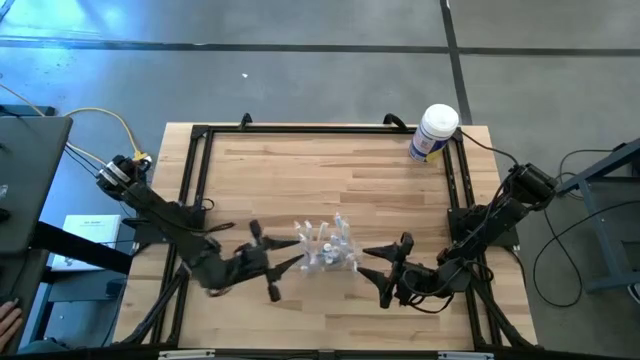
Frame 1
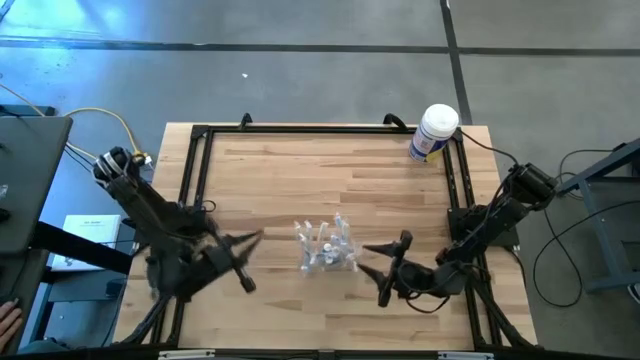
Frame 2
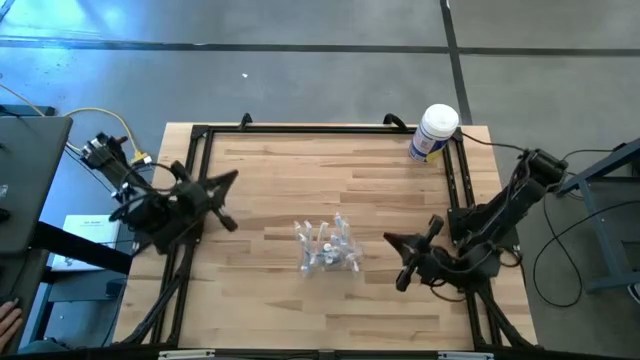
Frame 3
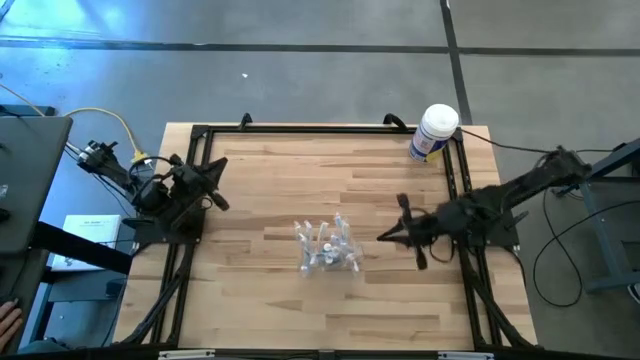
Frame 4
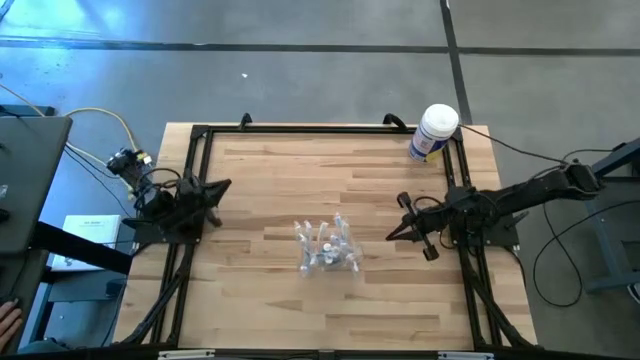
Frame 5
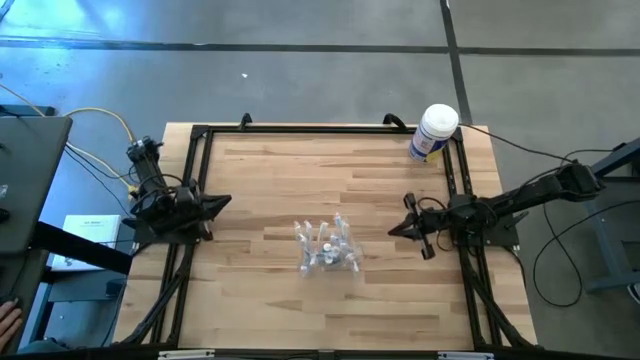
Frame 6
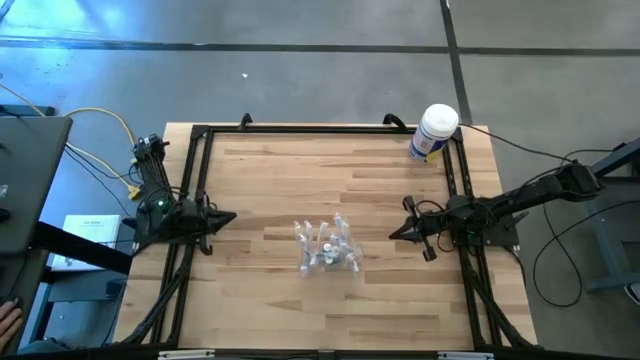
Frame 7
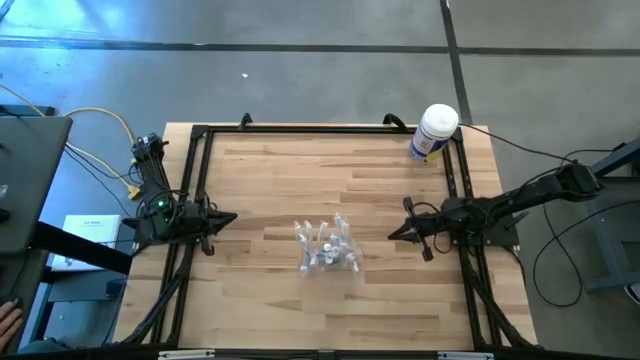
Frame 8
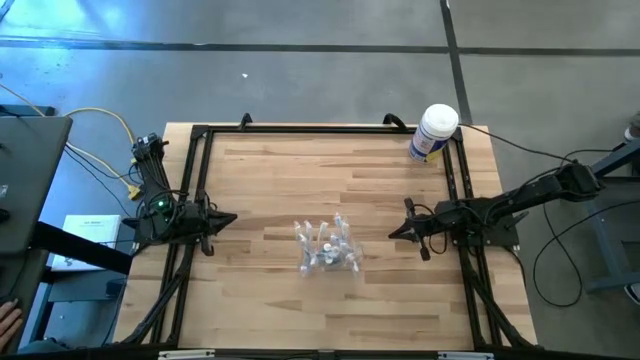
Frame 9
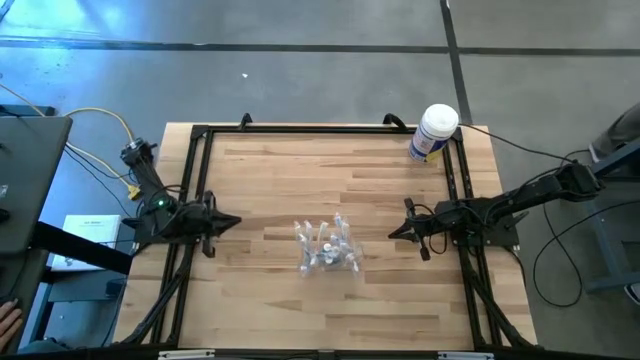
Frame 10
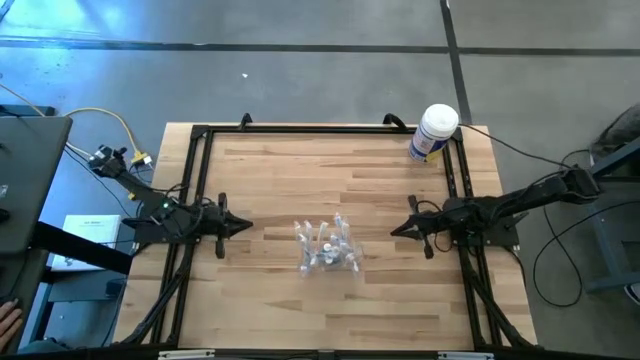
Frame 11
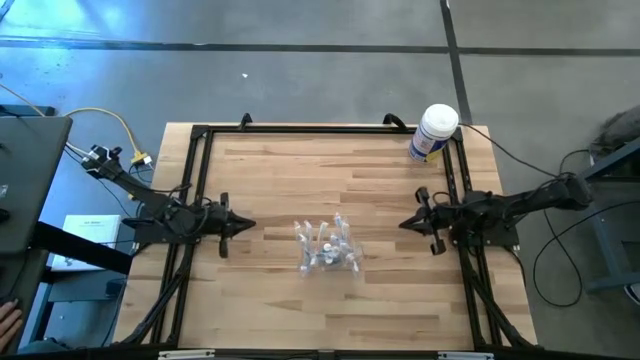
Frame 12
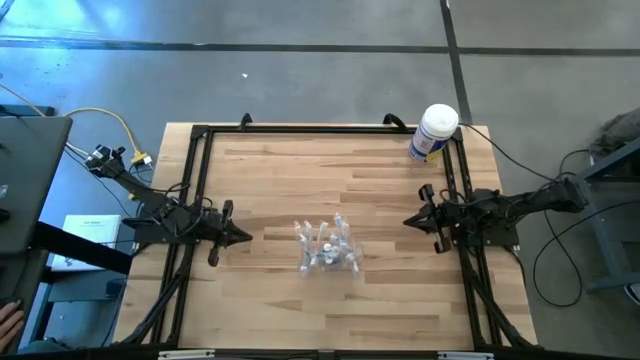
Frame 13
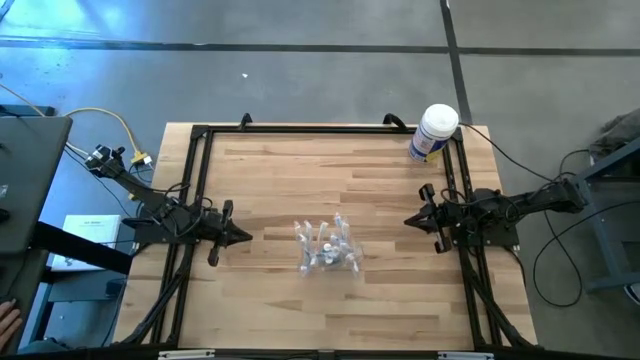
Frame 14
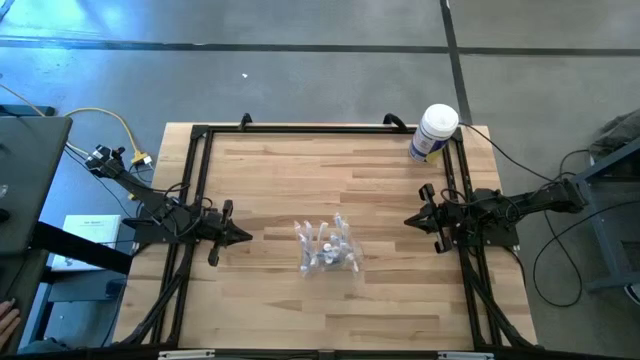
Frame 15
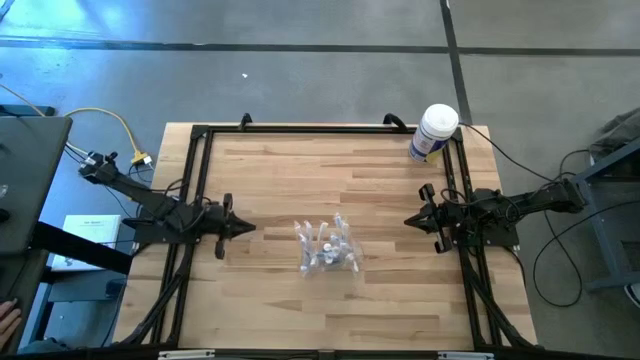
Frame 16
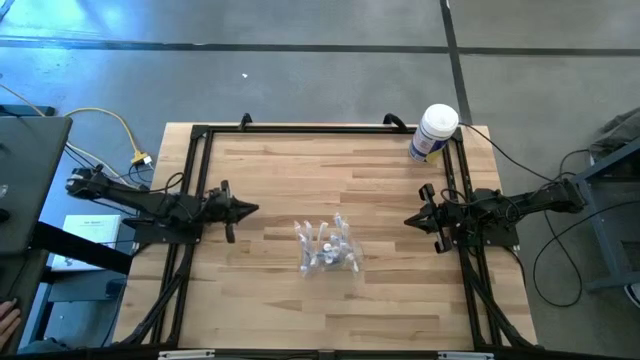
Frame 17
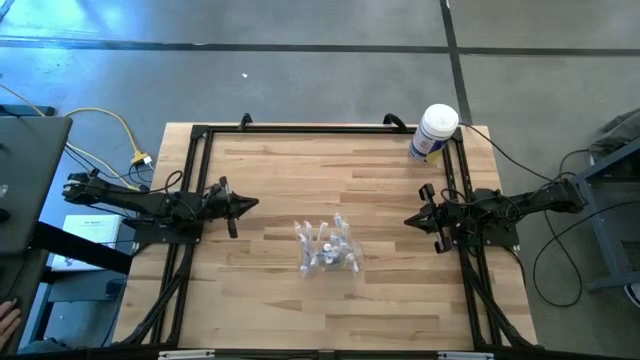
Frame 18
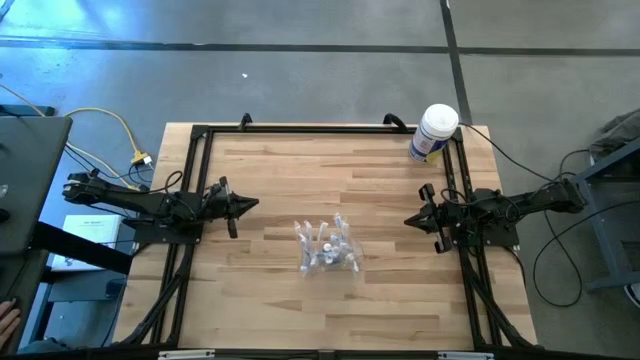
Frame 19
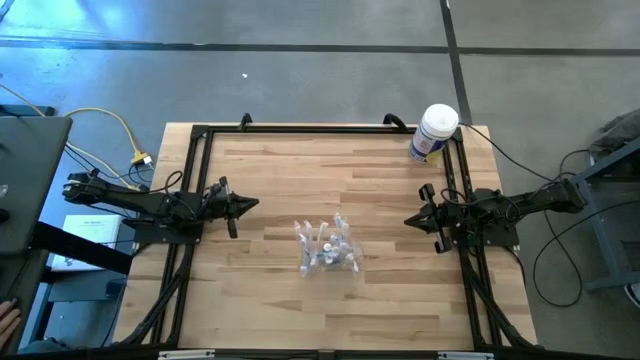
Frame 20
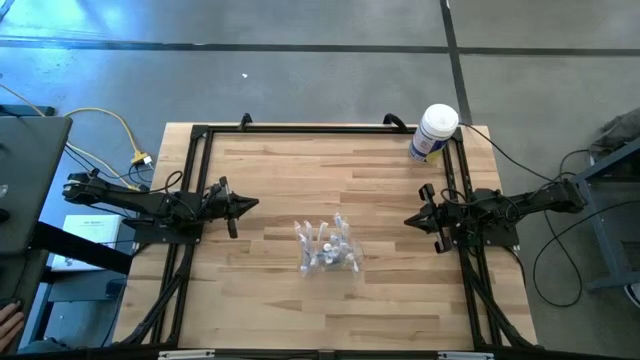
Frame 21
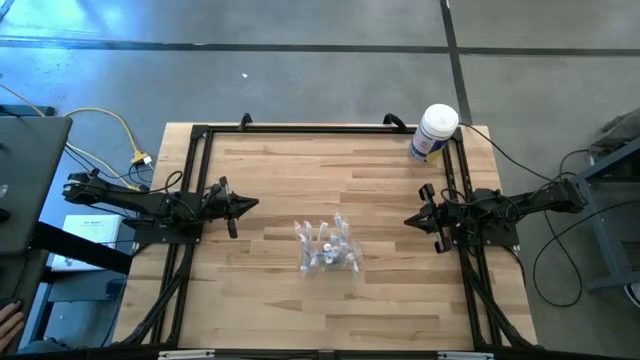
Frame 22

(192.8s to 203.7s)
Task: Pick & Place toothbrushing station
Return to Home Position

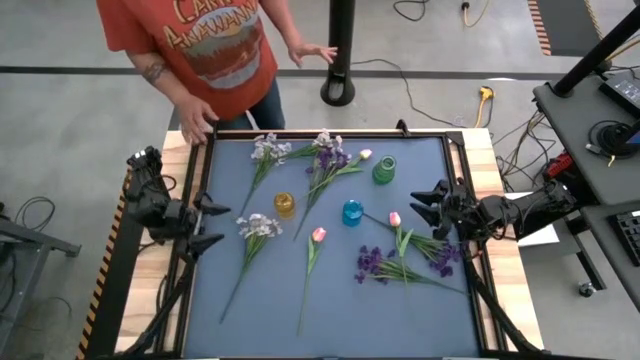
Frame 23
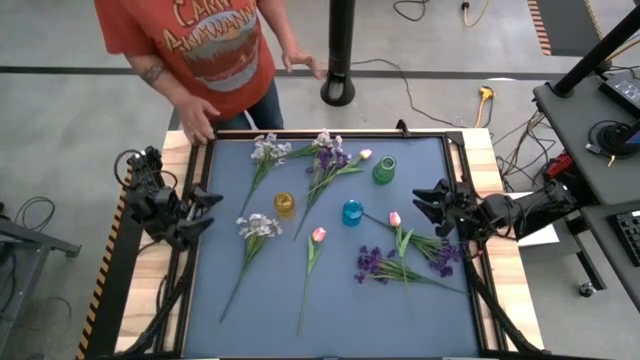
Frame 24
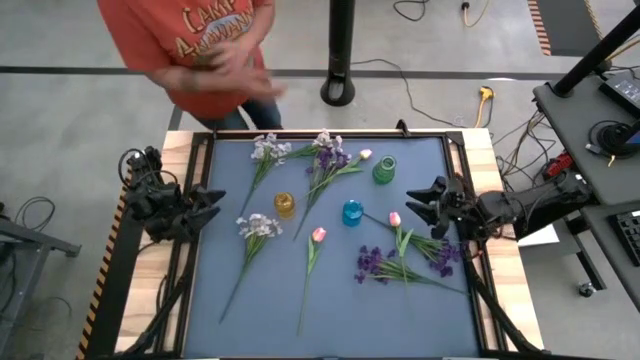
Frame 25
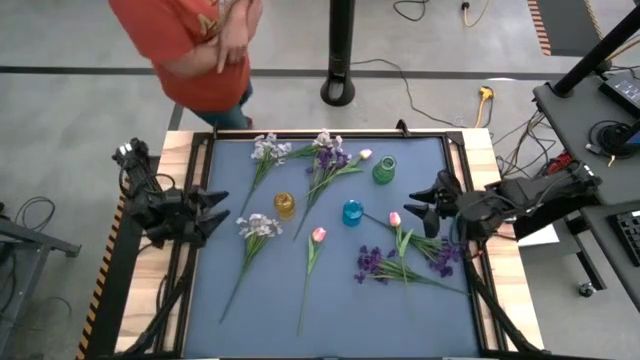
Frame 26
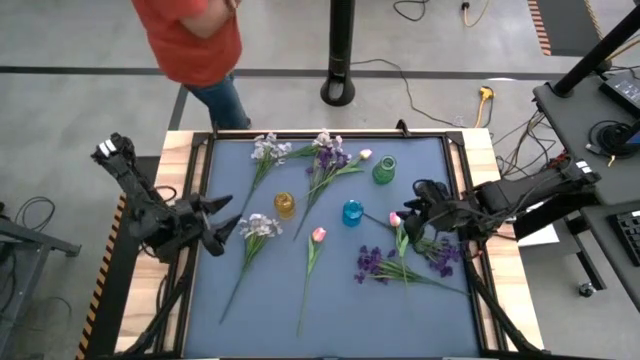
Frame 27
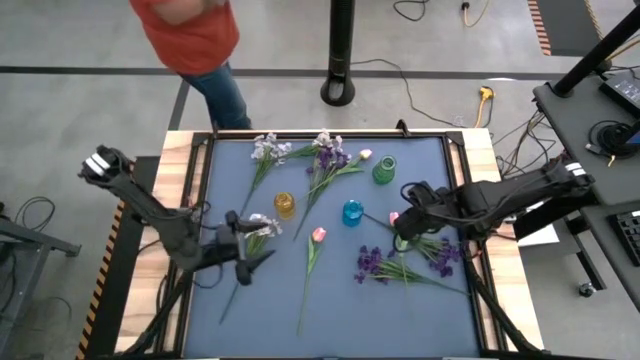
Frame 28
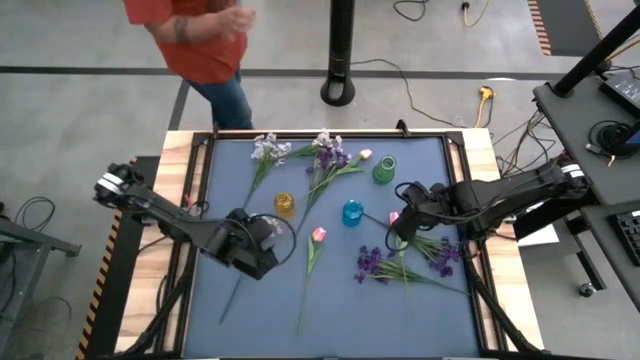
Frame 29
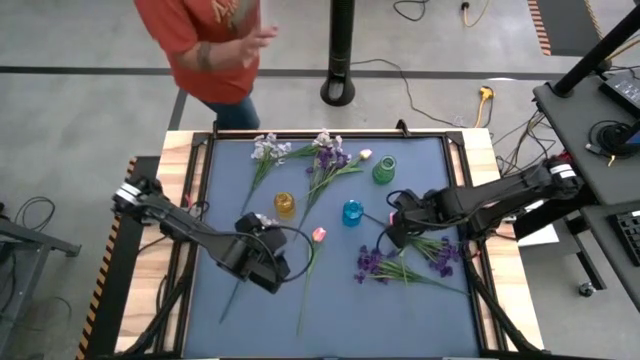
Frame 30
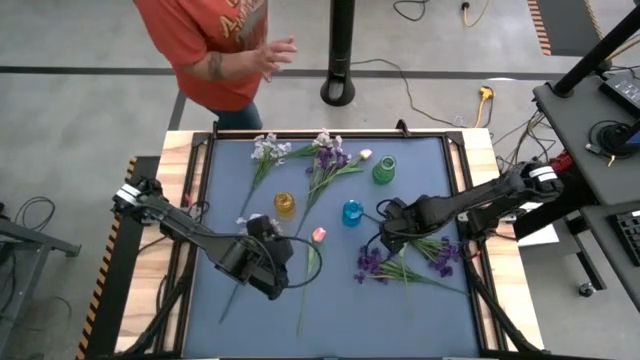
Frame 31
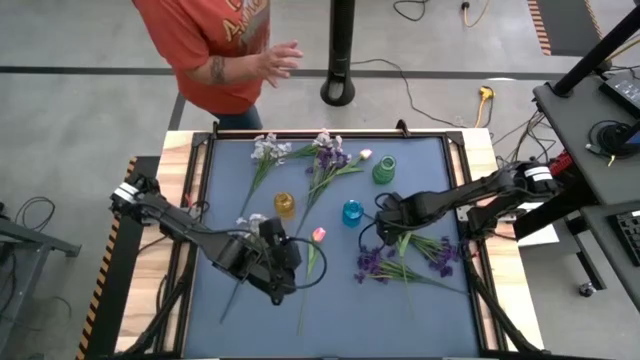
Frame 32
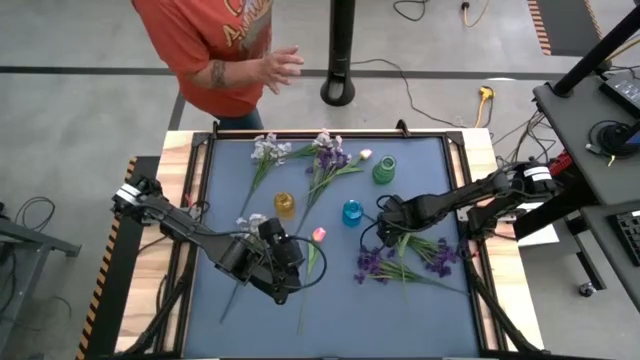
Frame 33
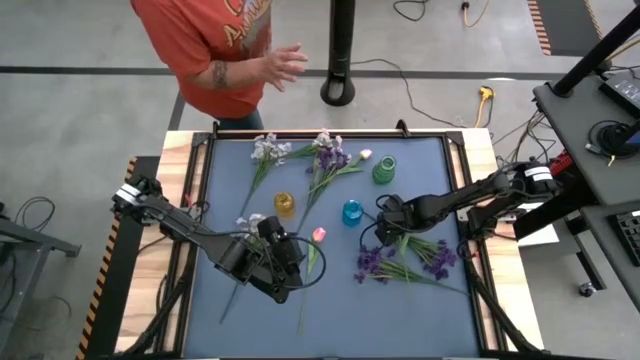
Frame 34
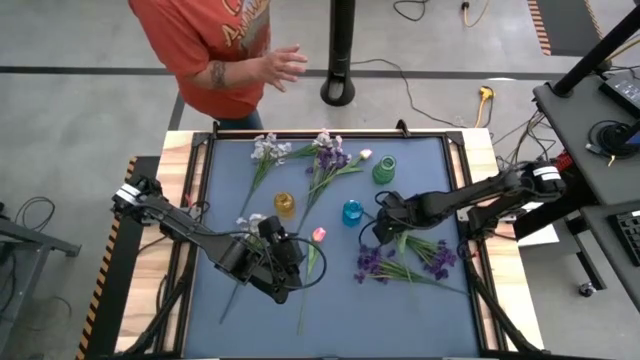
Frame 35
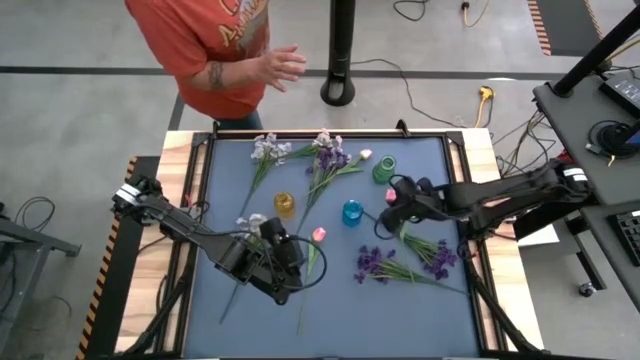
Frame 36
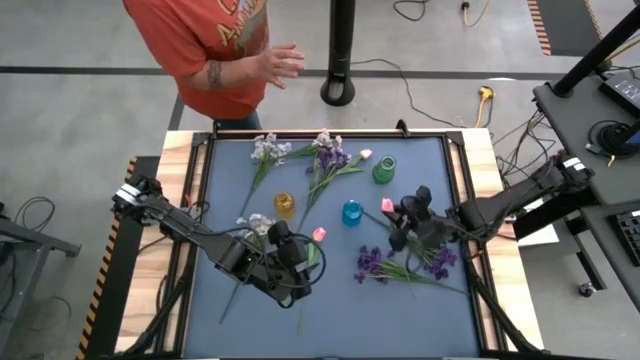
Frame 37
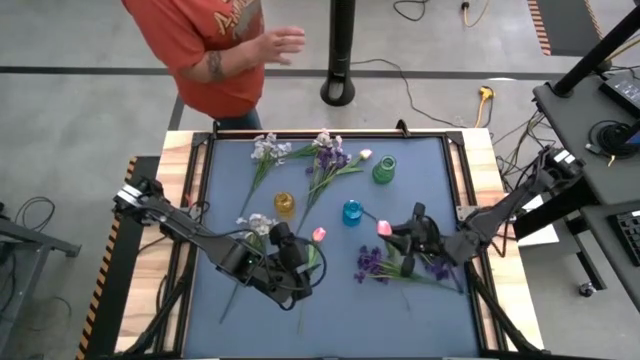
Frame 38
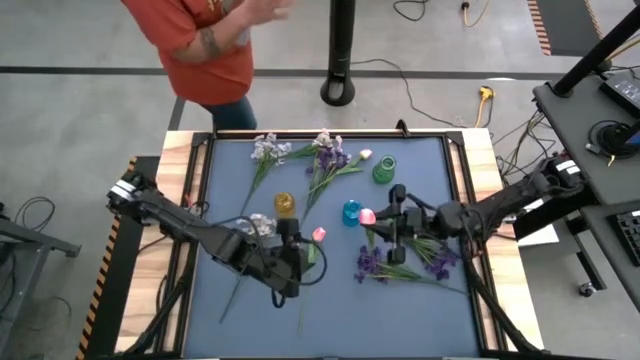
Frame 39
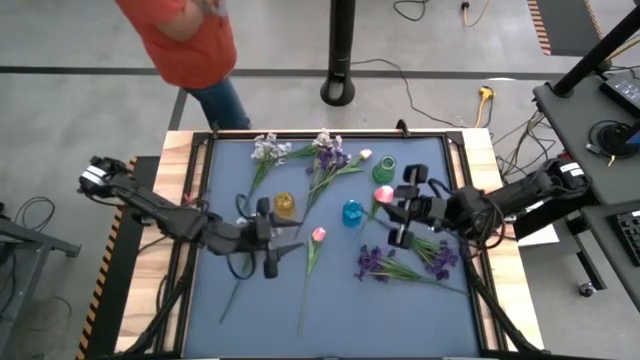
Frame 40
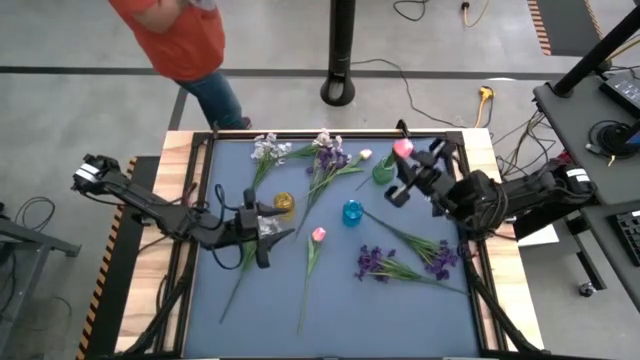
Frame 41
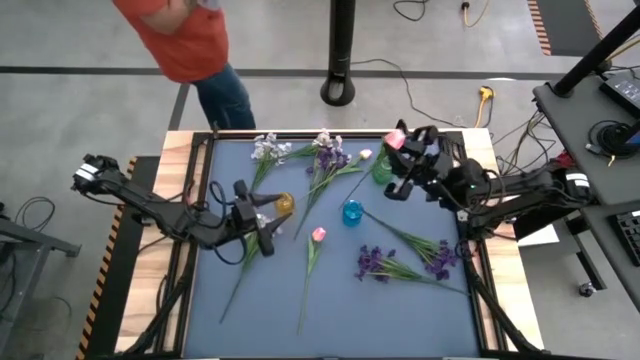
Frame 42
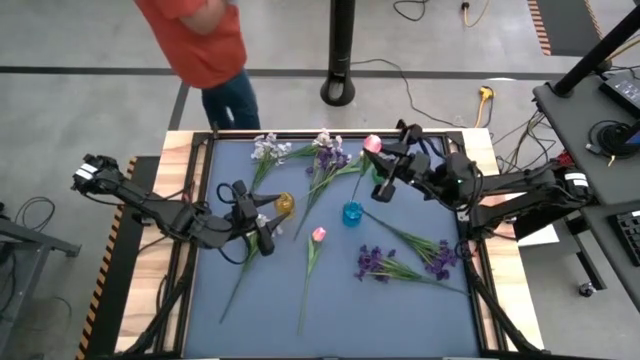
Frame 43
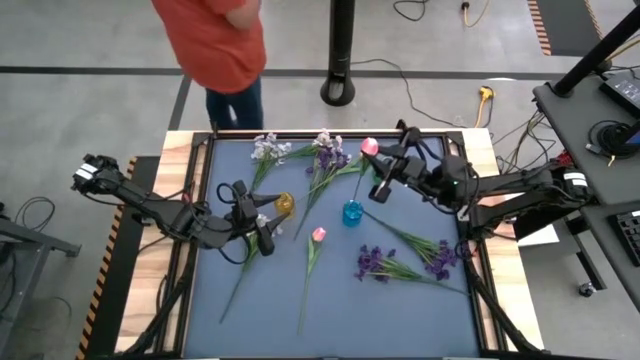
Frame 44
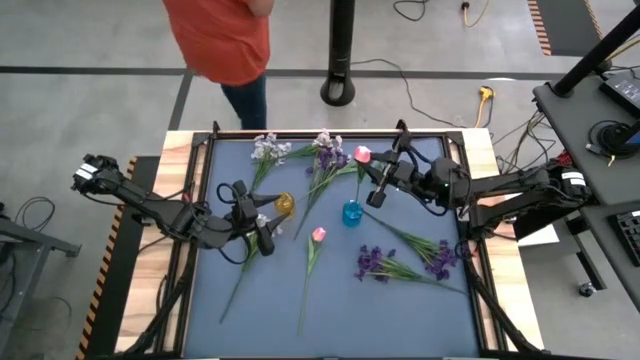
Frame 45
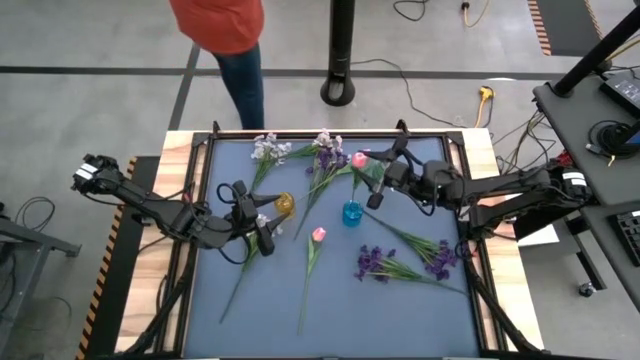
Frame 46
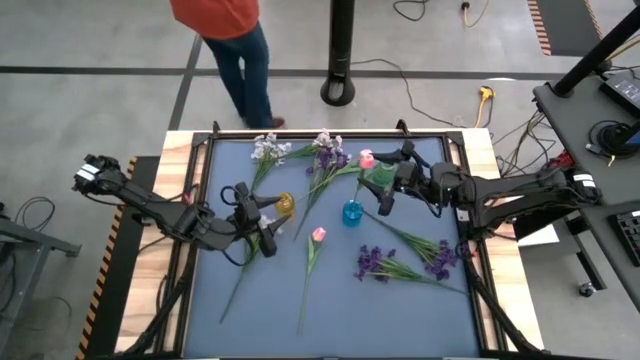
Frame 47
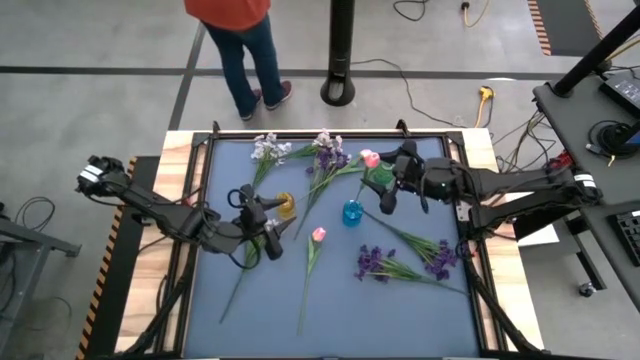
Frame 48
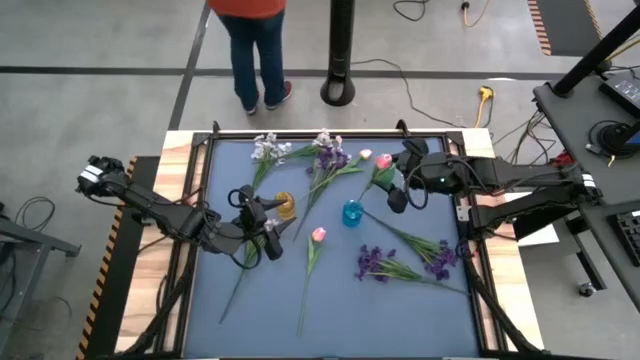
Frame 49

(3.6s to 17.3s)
Task: Sort flowers into vase by color
Put the bottom right pink tulip into the blue flower vase
